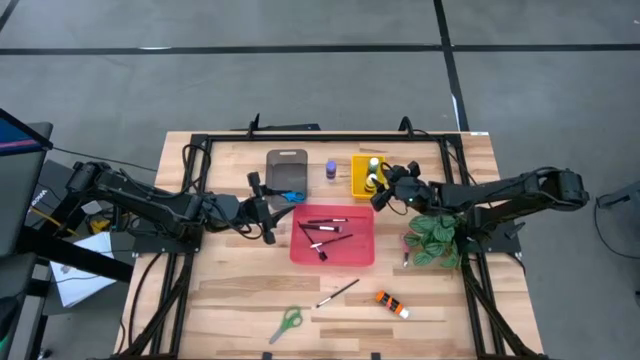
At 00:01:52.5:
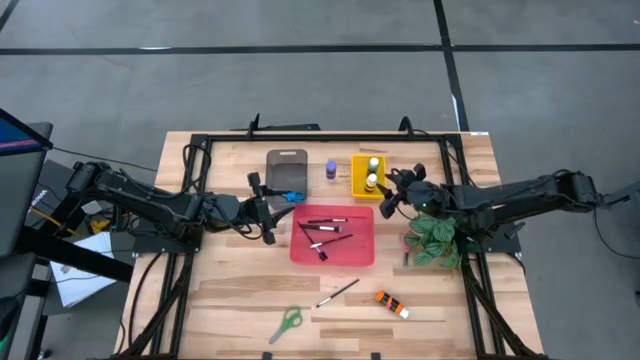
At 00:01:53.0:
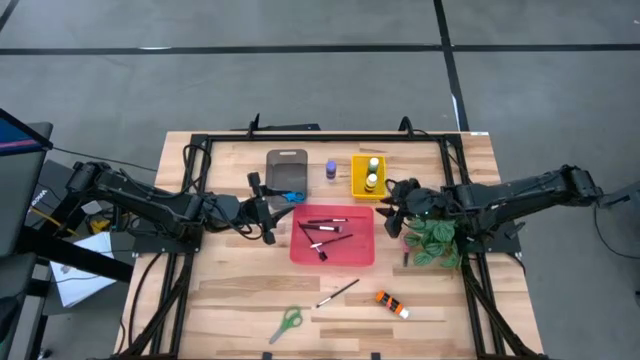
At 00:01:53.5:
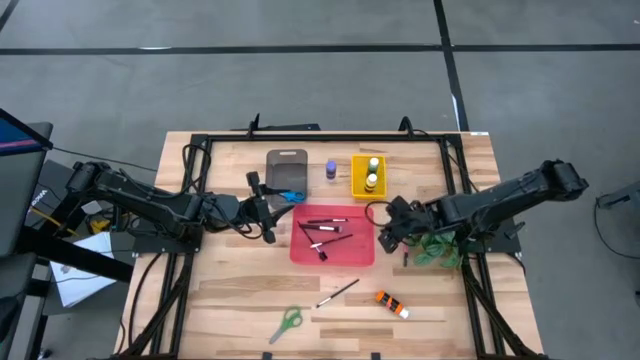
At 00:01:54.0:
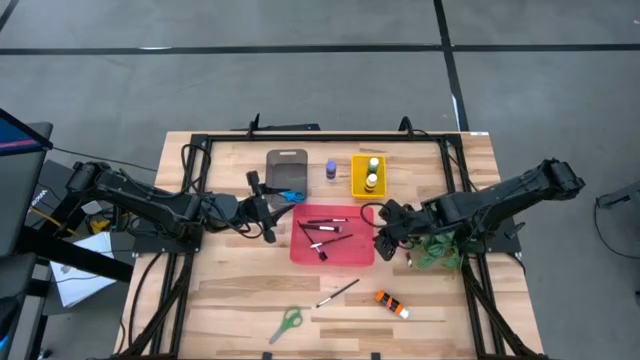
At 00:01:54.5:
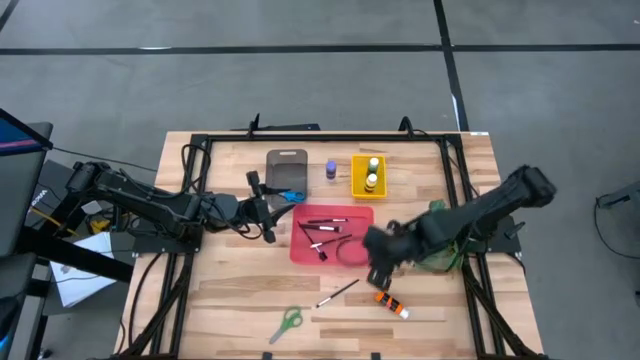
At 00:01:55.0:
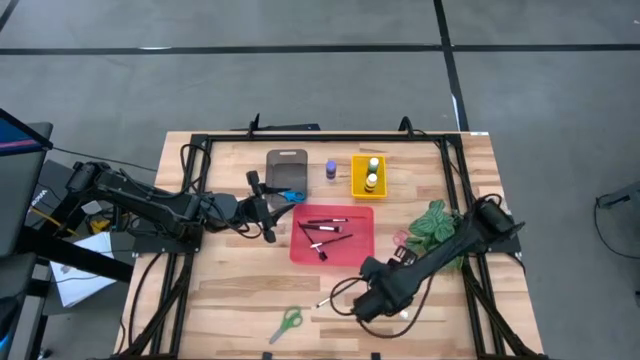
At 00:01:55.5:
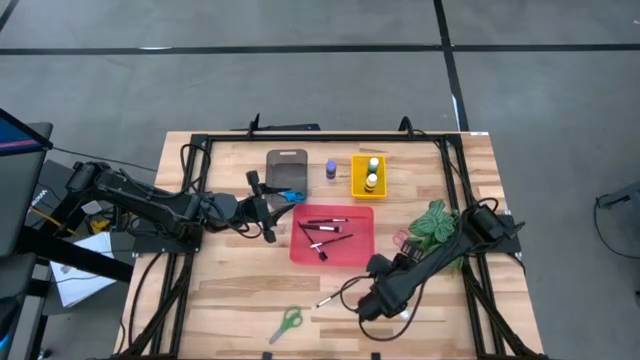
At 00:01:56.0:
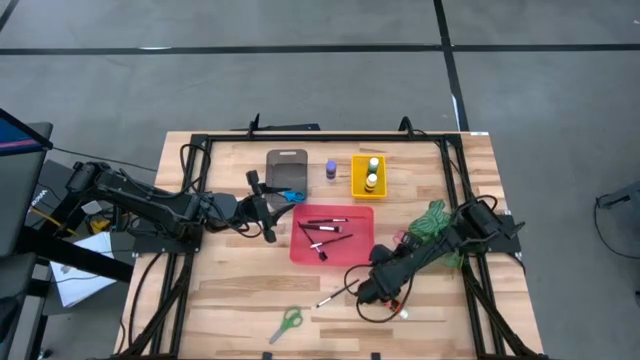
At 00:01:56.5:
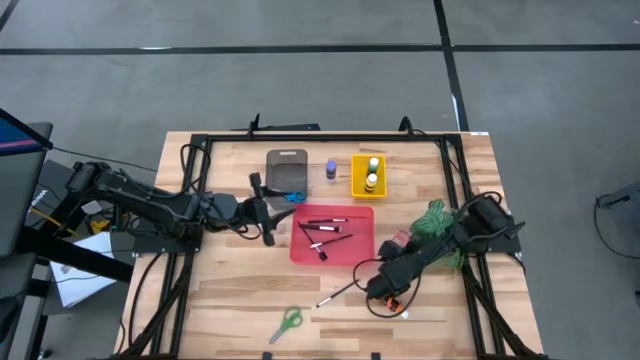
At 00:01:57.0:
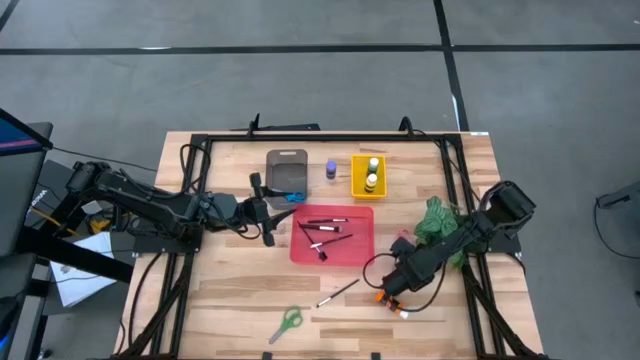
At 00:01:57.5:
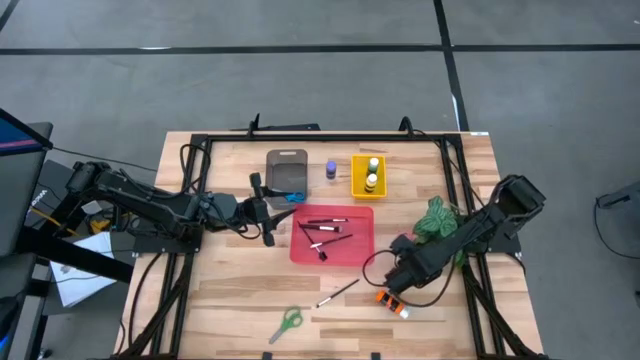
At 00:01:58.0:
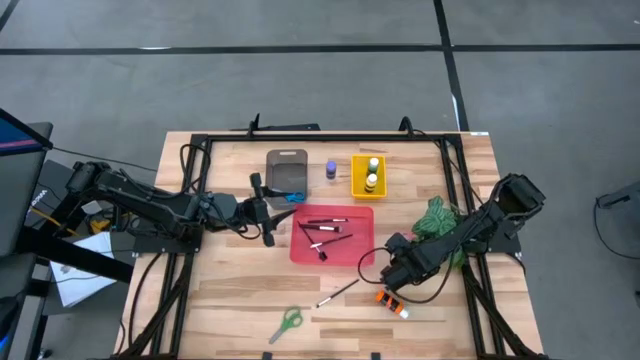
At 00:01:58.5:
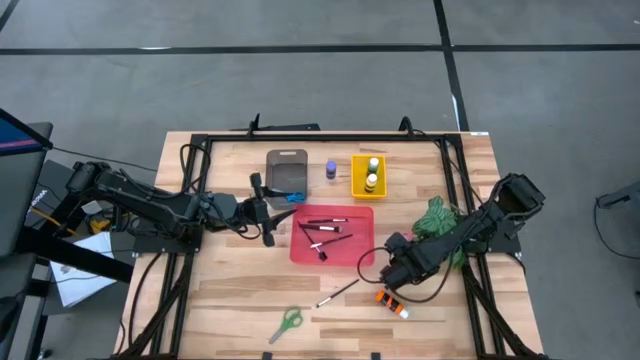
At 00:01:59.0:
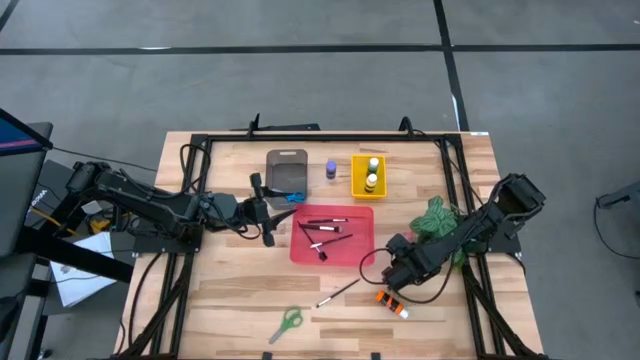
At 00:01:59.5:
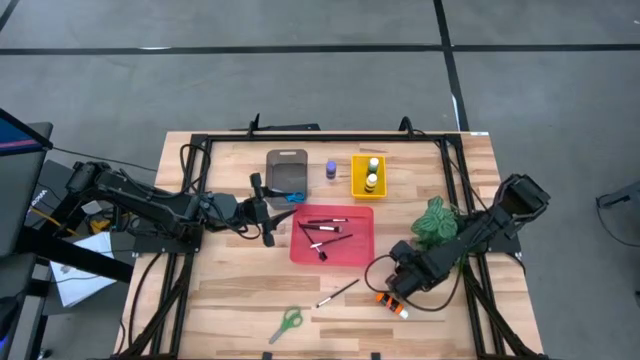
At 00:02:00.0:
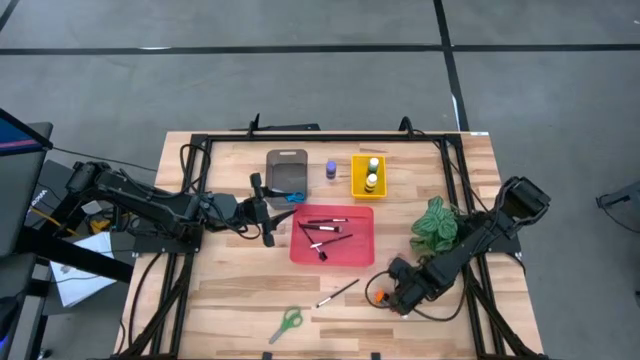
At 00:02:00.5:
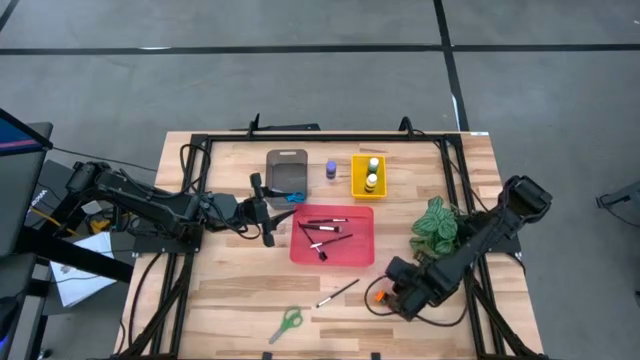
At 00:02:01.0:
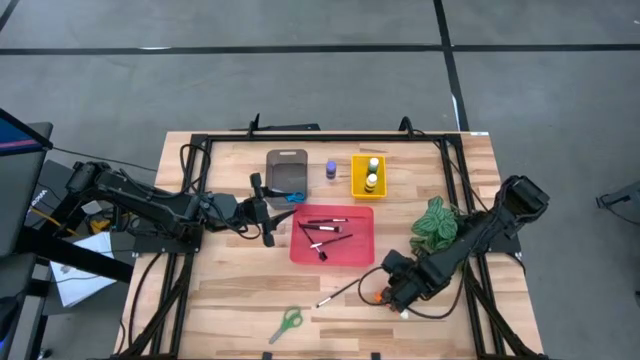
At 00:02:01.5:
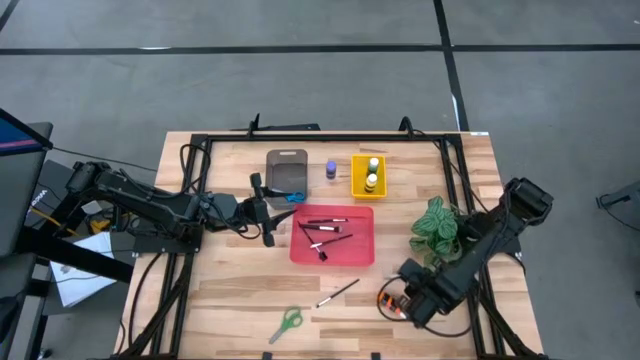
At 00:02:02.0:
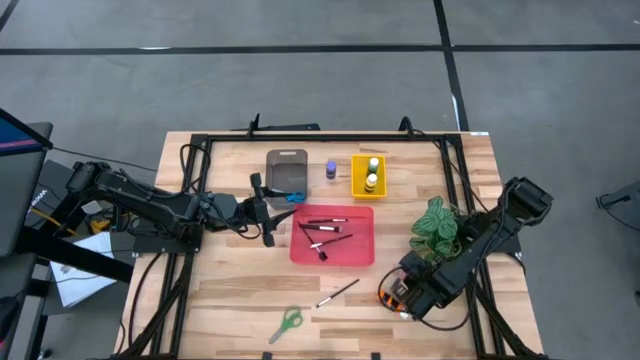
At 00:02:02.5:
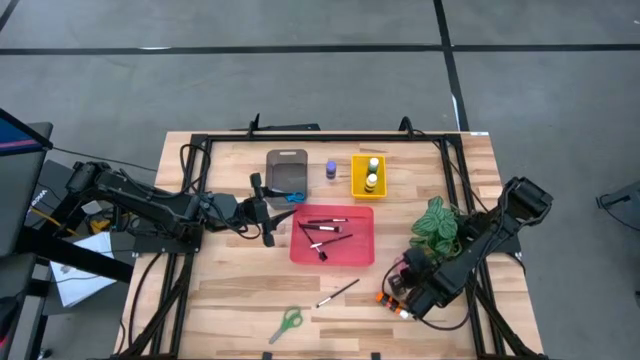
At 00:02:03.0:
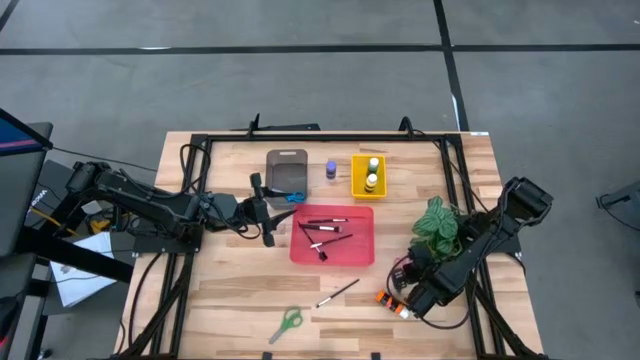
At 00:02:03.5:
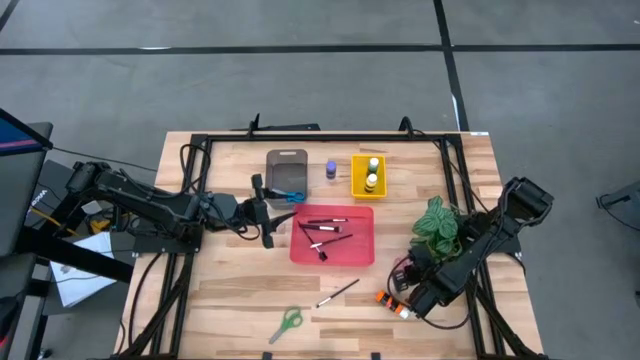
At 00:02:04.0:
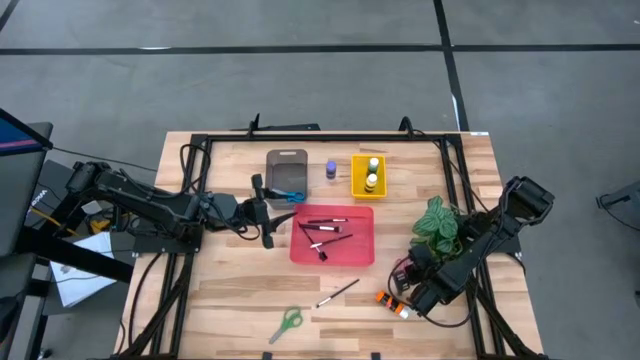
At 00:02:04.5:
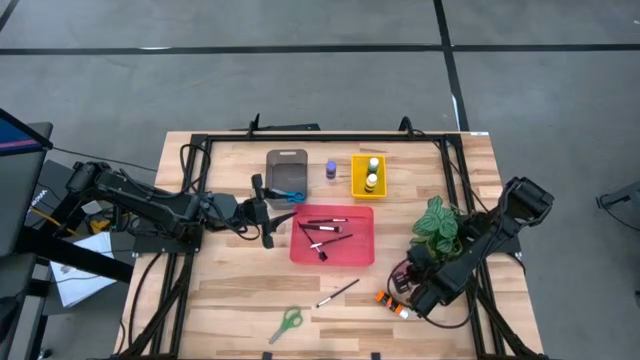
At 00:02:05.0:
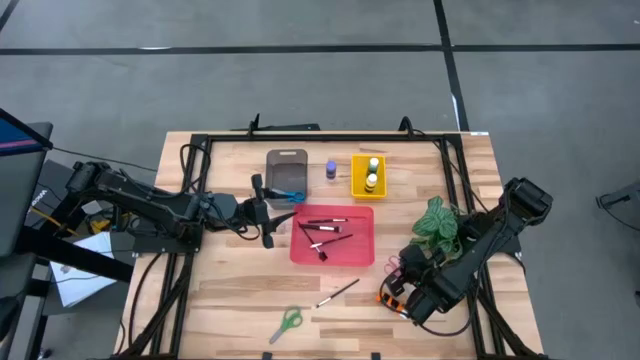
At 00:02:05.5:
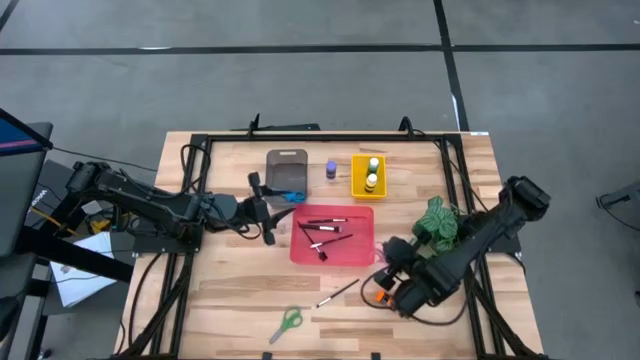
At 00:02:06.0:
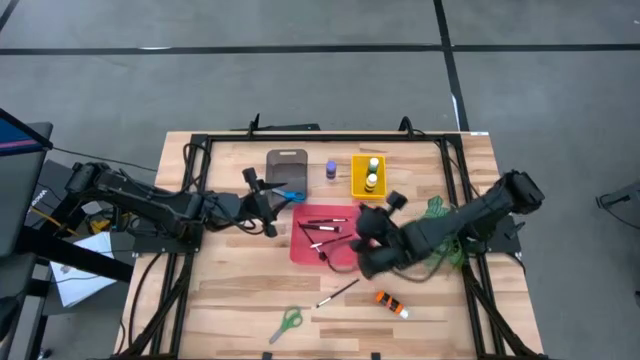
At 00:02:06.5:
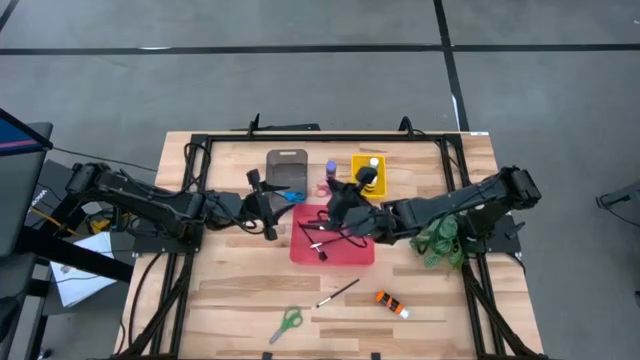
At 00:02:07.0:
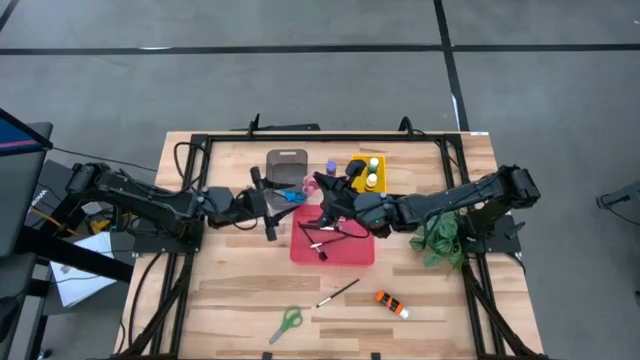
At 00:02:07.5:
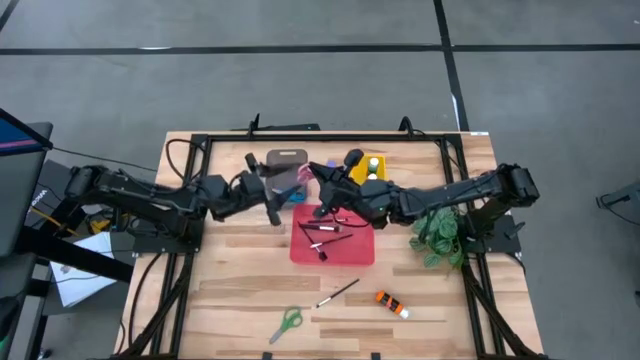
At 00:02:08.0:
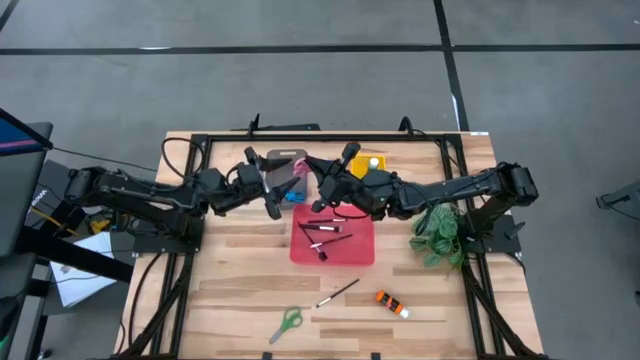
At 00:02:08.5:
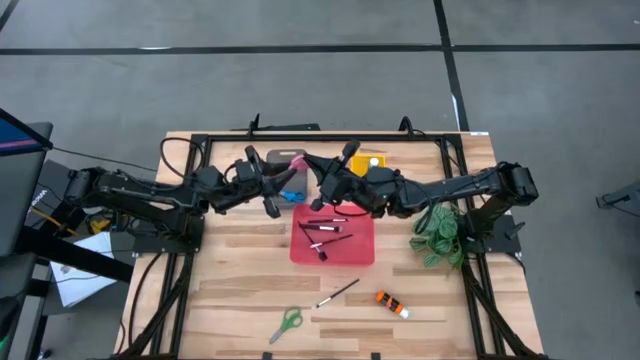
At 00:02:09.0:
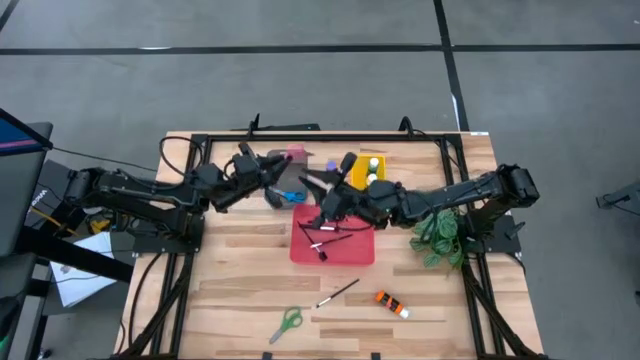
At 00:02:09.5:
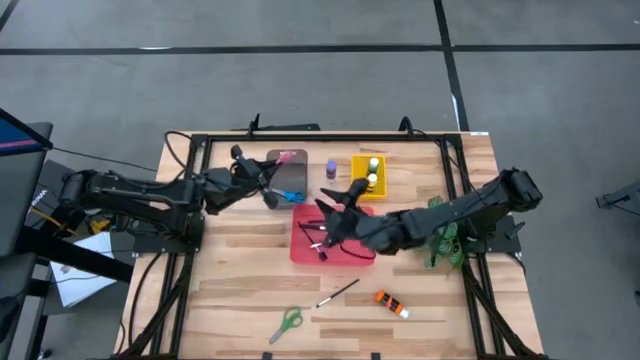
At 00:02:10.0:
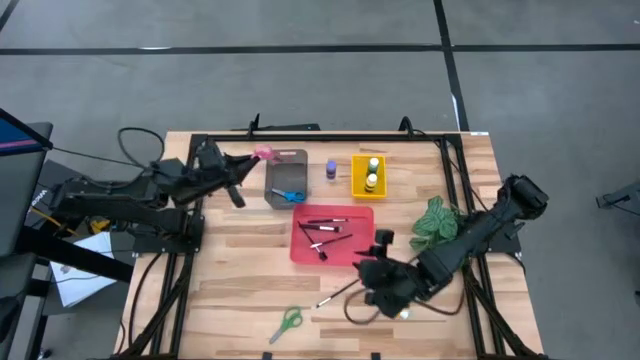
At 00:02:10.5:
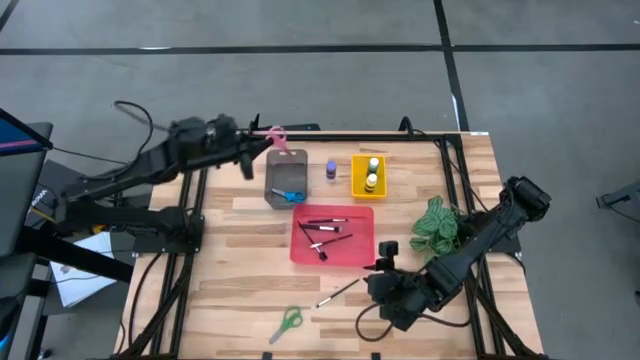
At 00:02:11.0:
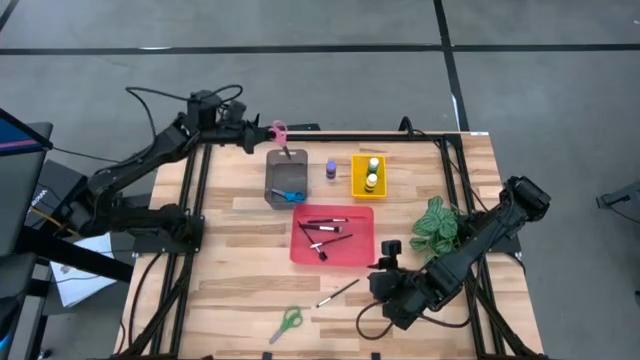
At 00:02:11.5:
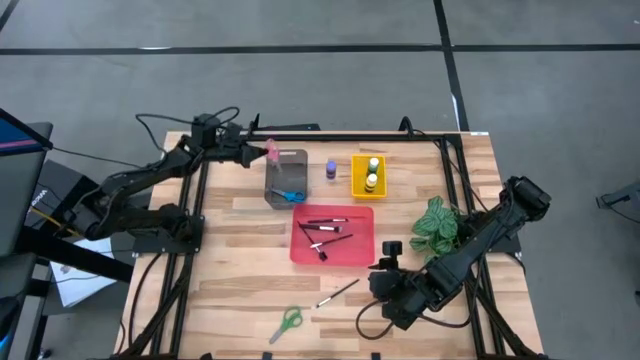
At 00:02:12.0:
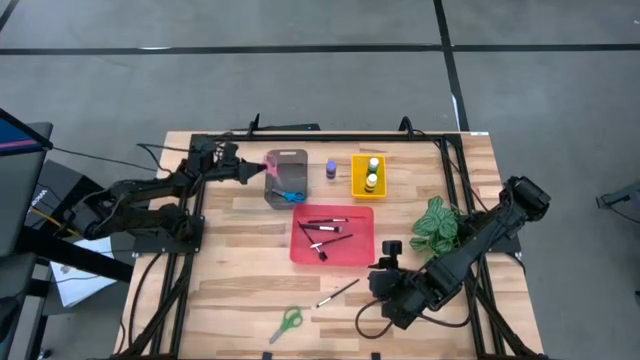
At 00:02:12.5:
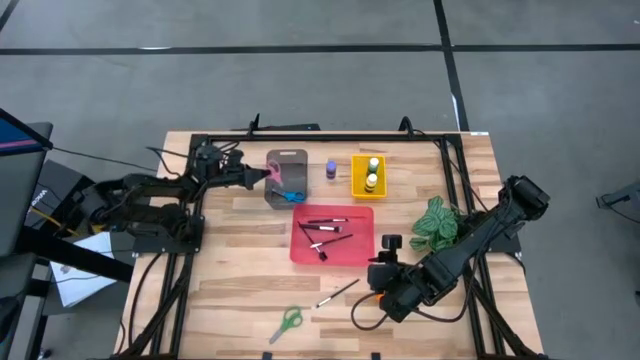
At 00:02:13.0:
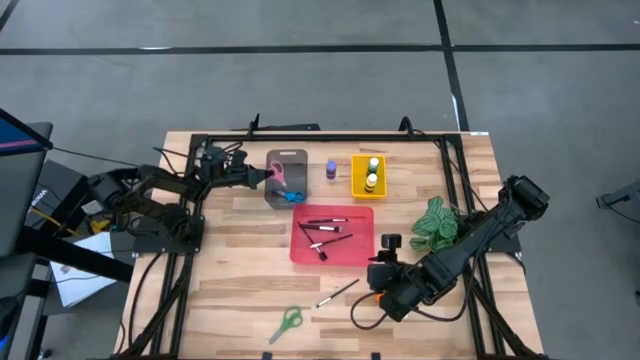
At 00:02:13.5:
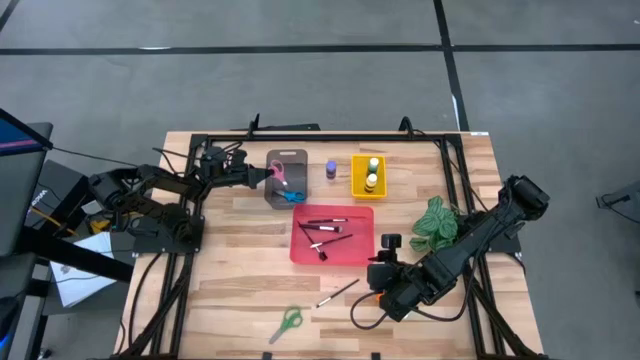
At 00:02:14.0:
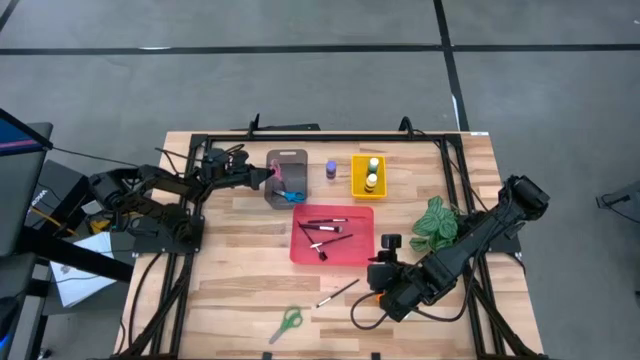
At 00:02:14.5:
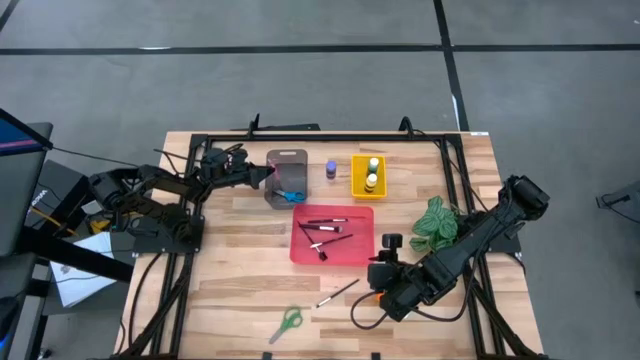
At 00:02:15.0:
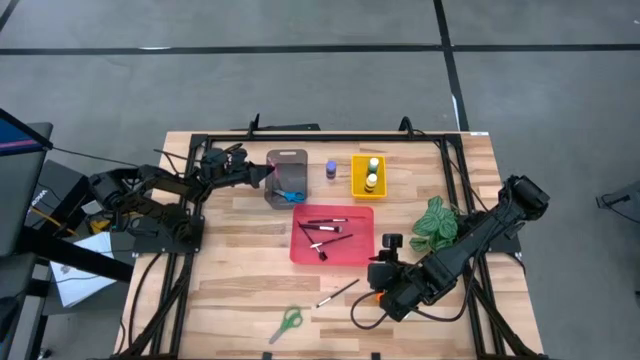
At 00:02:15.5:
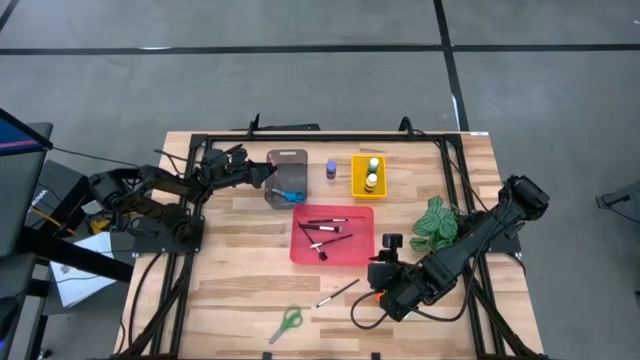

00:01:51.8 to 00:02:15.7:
Task: Pick & Place Paint Supplies
Put the pink scissors into the black bin
